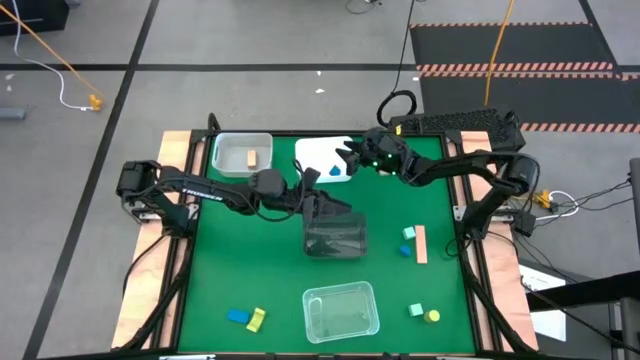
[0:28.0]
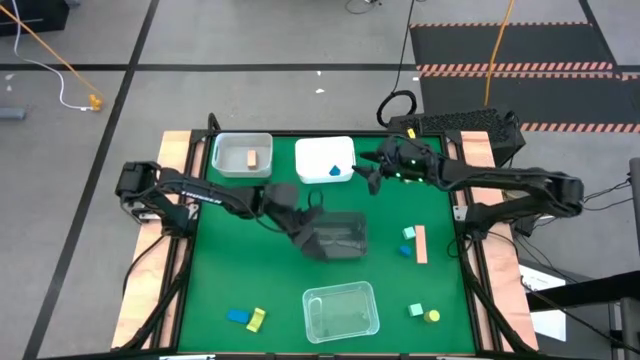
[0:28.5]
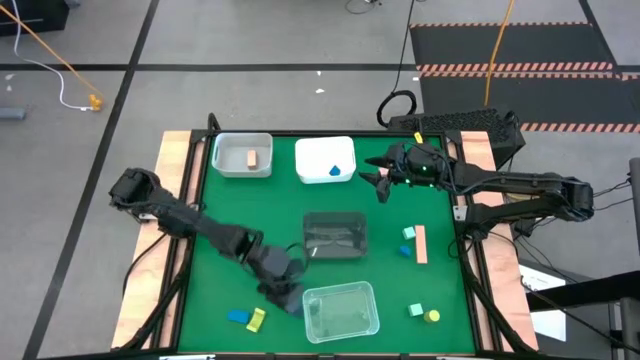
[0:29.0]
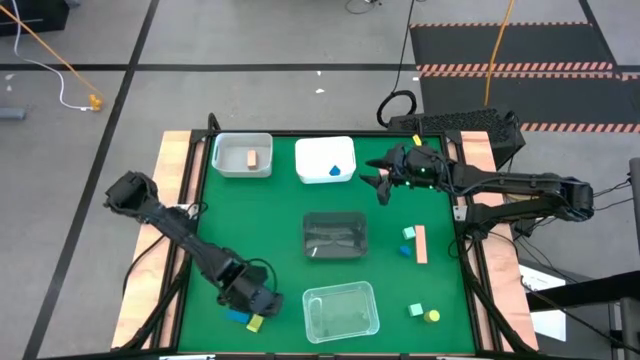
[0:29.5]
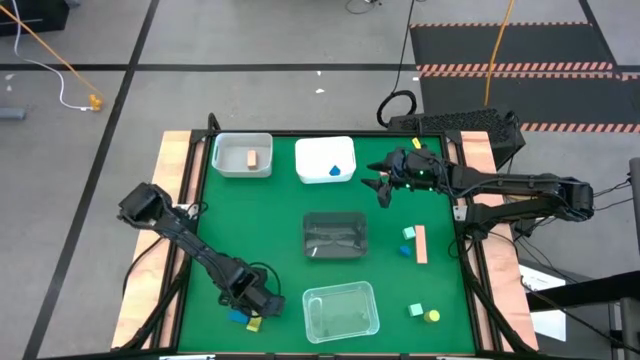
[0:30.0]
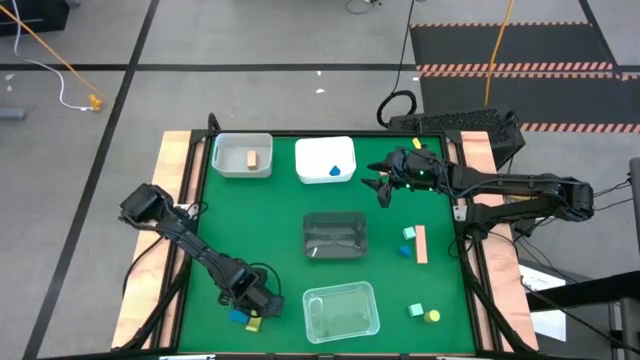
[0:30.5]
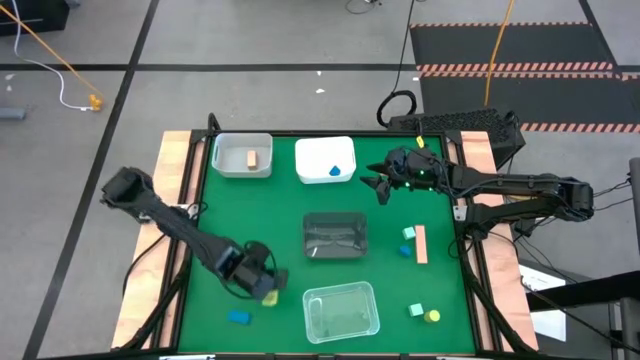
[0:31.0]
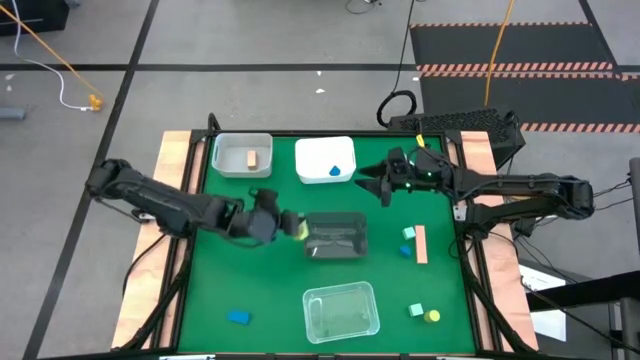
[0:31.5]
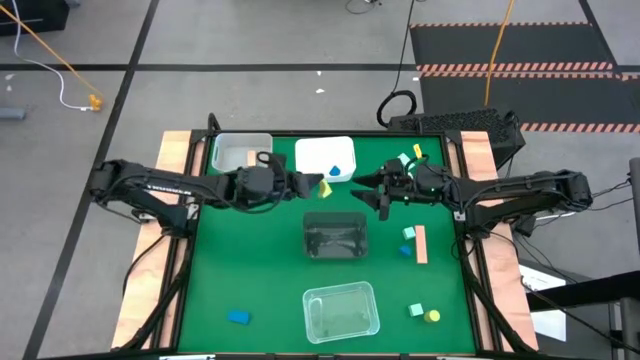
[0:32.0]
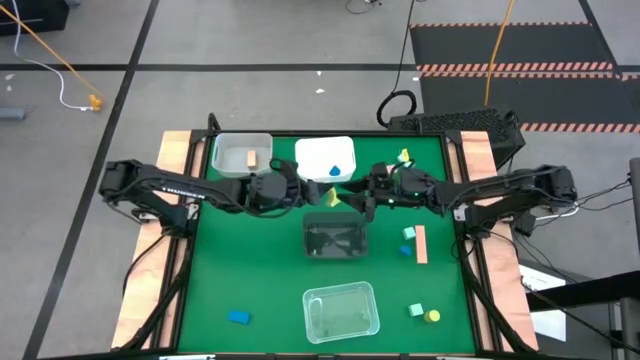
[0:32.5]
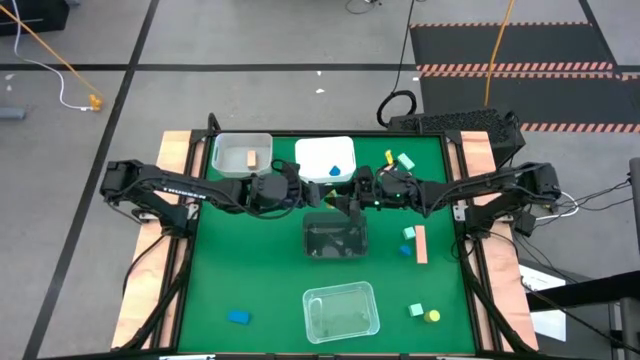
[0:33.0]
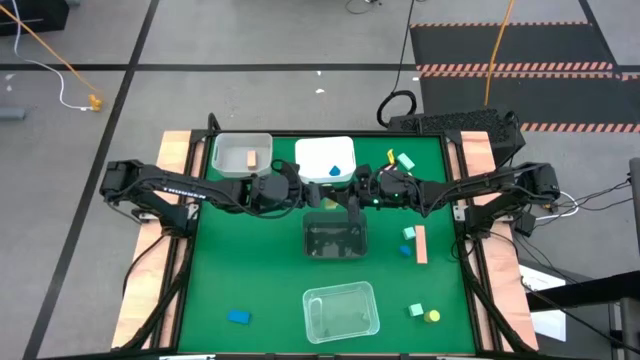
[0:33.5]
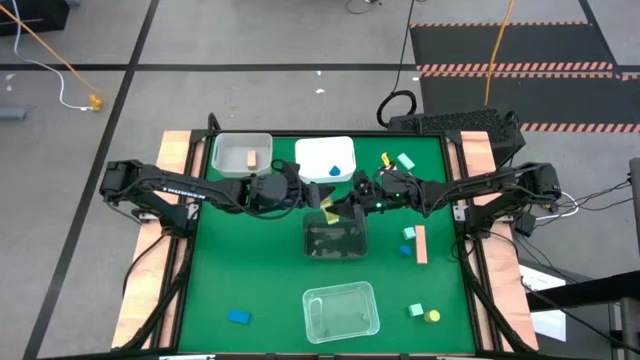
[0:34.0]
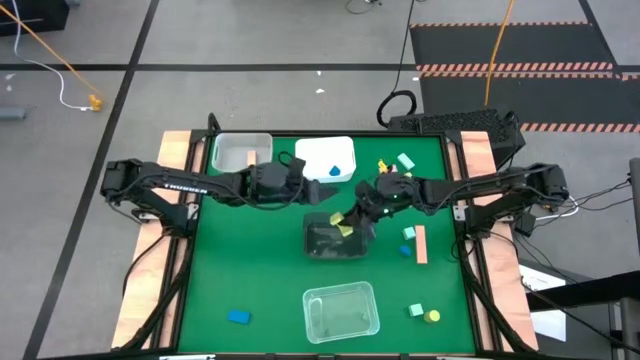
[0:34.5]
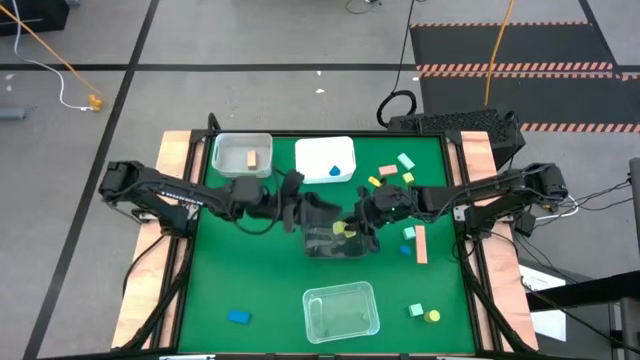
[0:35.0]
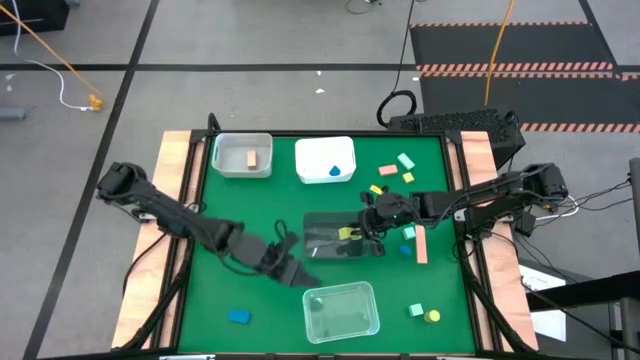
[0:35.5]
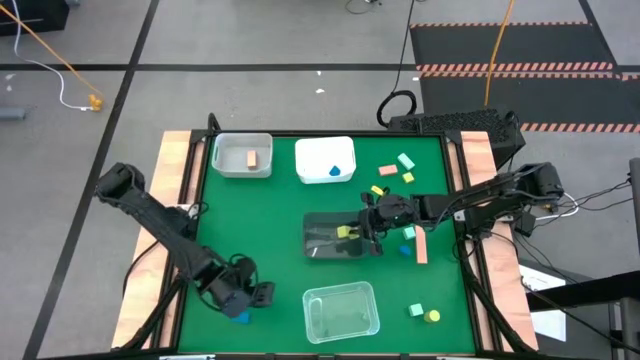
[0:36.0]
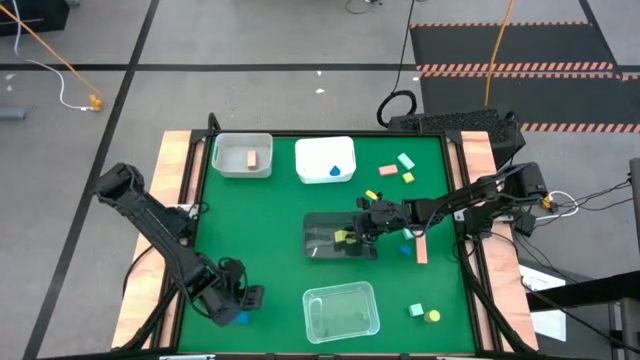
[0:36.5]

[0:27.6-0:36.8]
Task: Sort & place blocks by color
Put the left light green block into the black bin

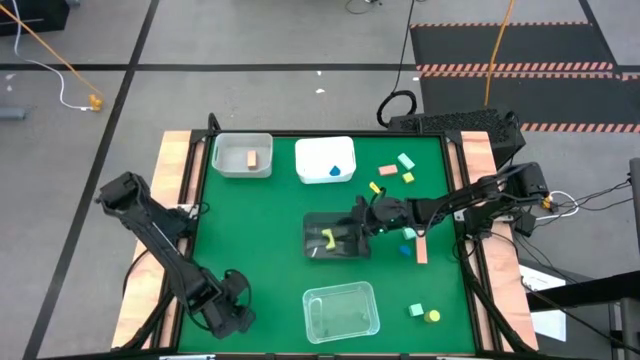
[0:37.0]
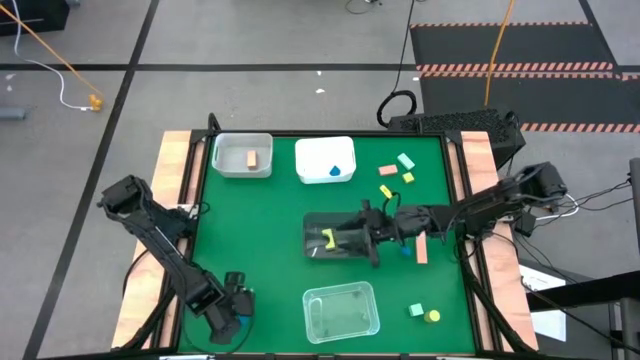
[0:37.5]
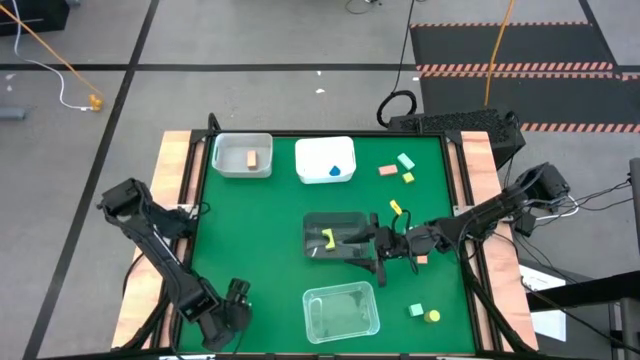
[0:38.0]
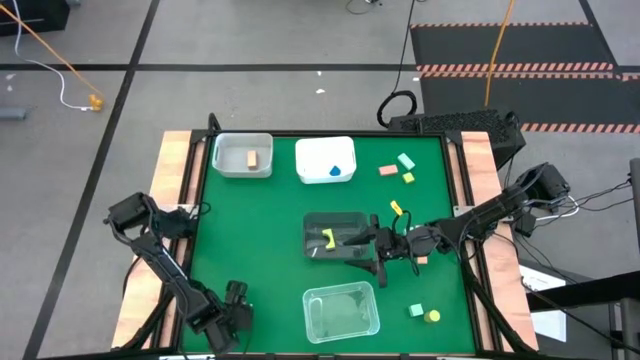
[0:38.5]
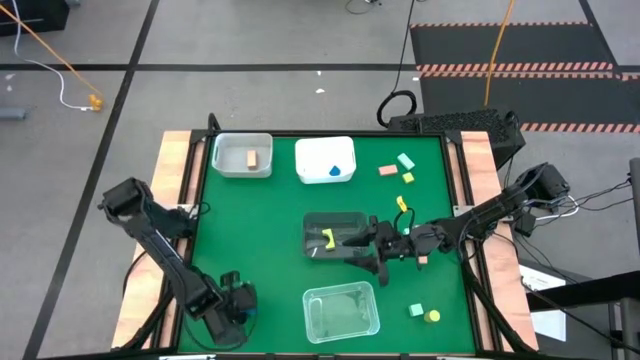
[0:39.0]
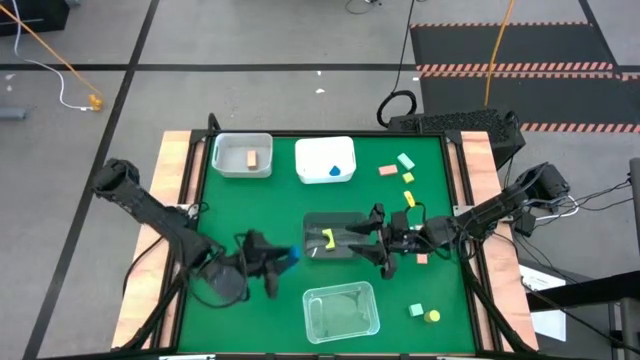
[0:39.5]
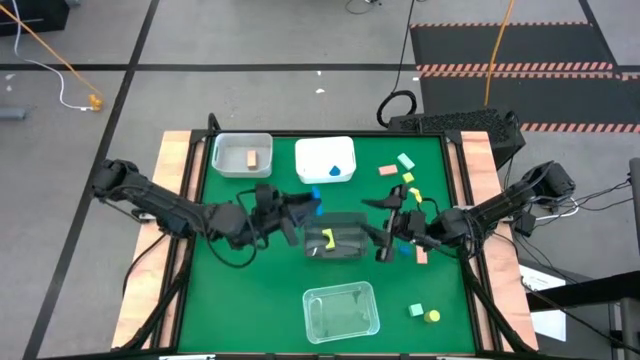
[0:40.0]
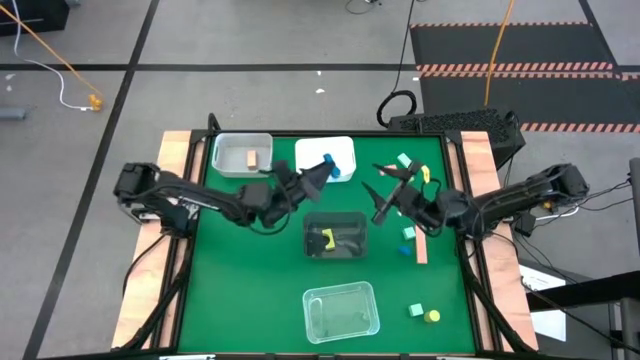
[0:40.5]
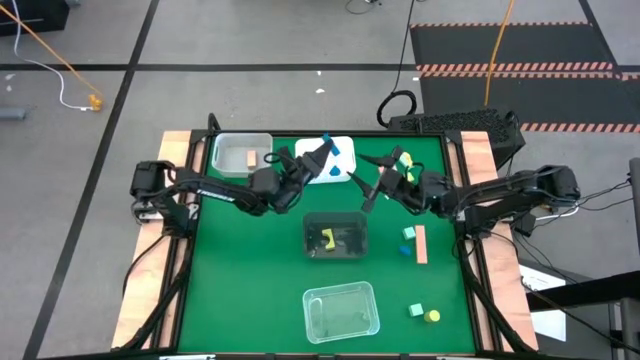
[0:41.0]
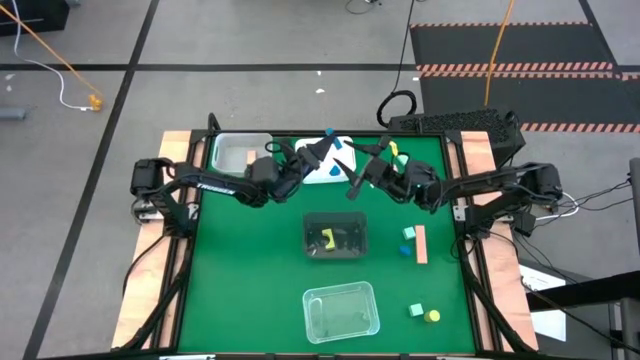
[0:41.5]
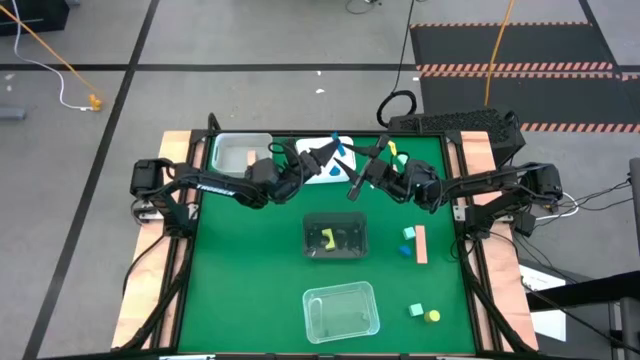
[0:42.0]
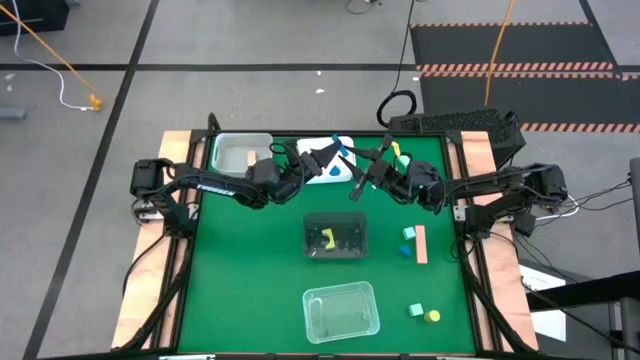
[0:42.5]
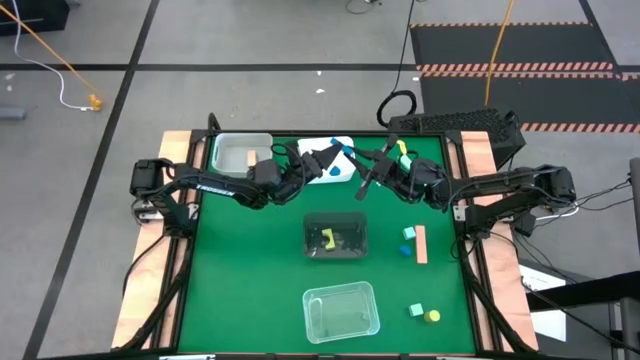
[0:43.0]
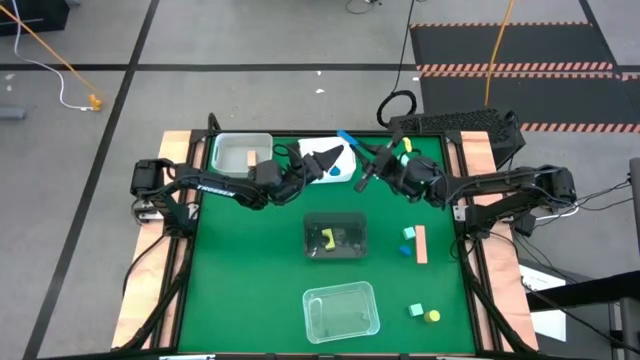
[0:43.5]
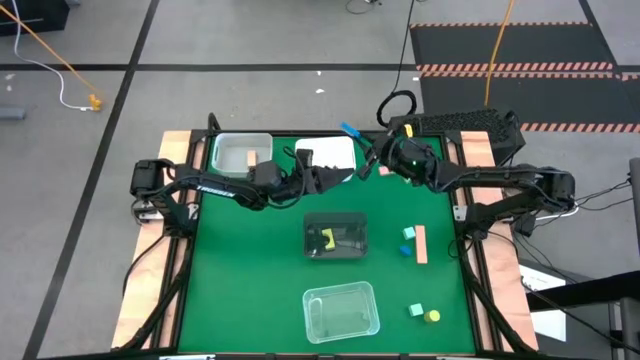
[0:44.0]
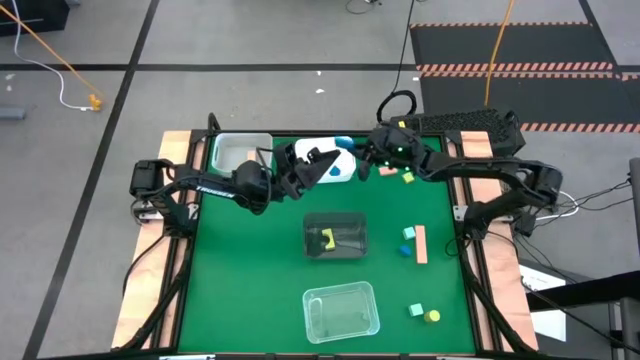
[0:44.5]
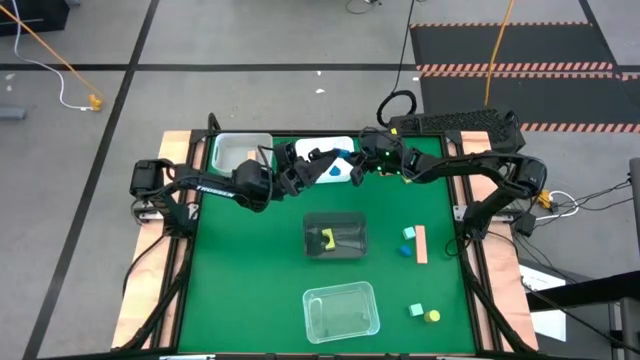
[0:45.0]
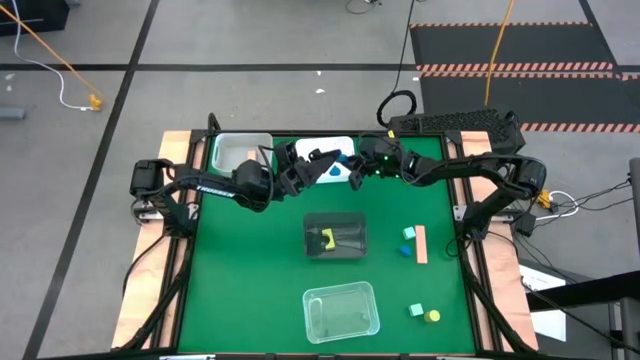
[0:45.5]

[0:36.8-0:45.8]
Put the left blue block into the white bin

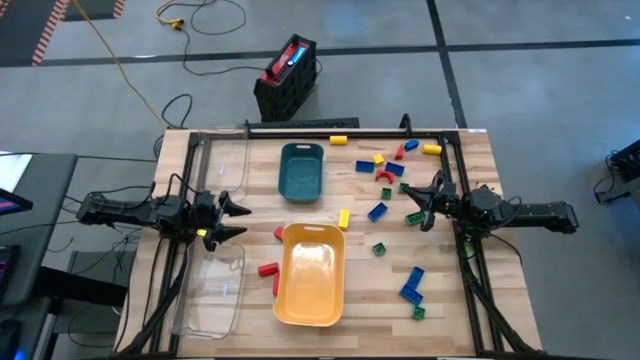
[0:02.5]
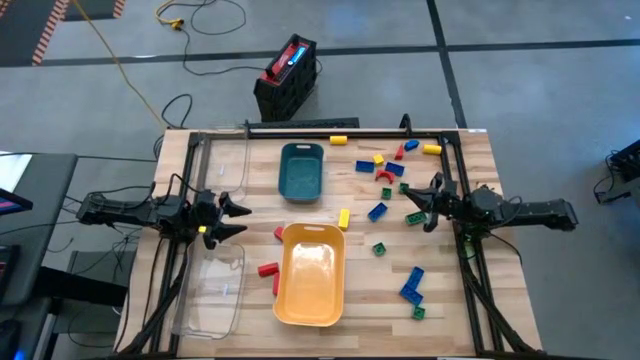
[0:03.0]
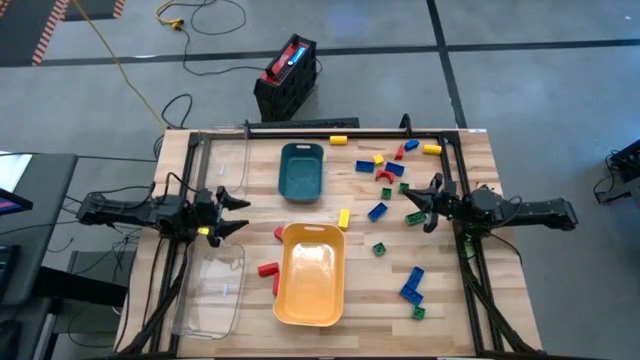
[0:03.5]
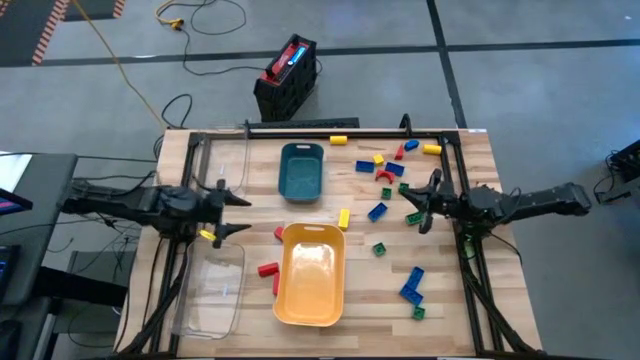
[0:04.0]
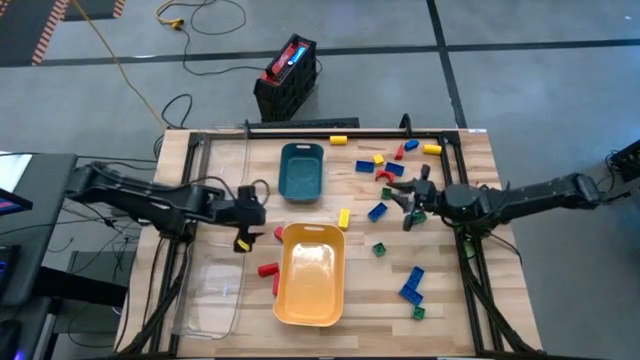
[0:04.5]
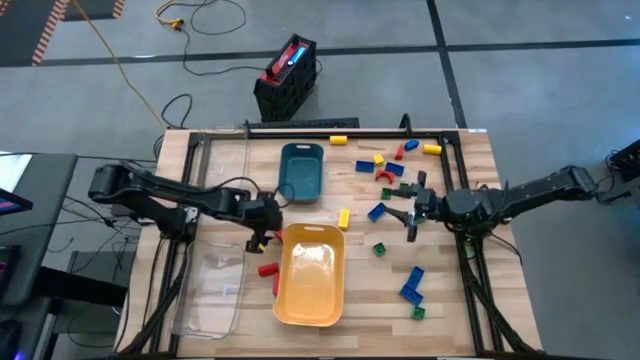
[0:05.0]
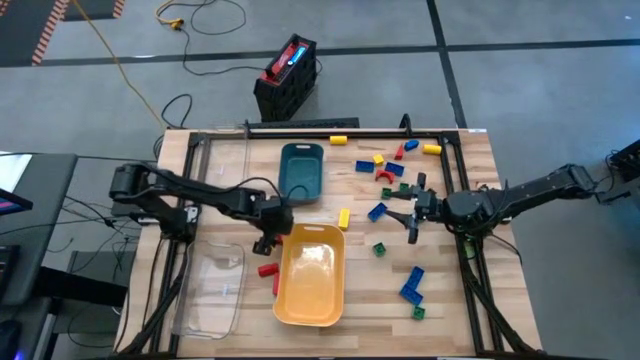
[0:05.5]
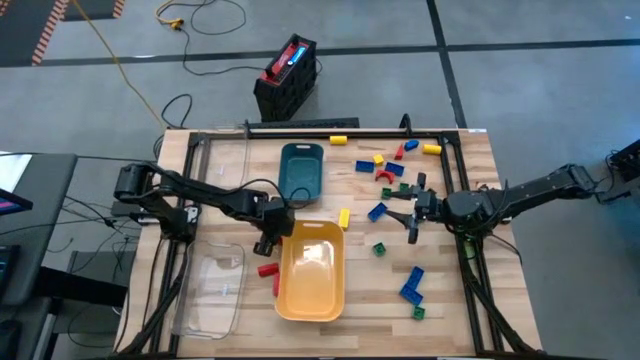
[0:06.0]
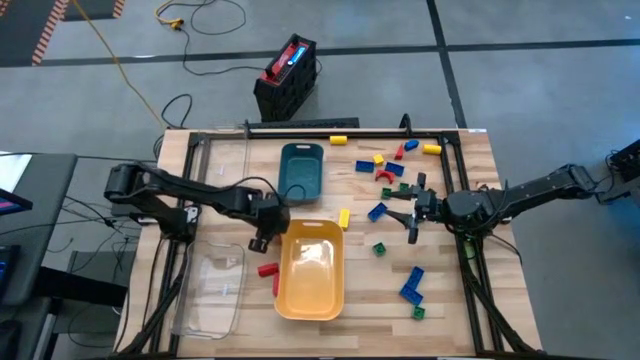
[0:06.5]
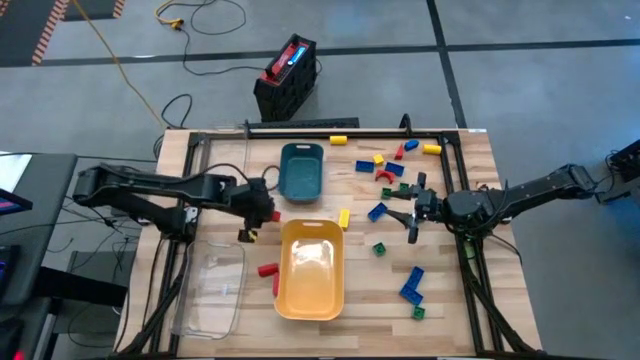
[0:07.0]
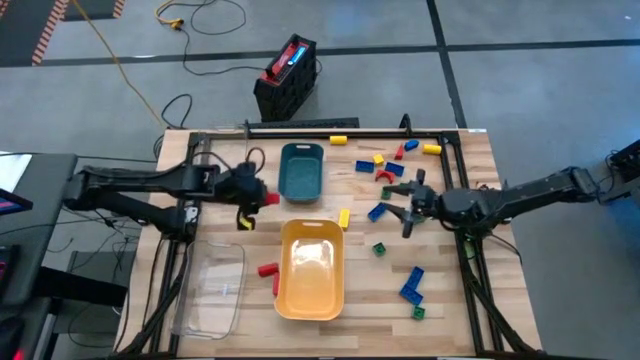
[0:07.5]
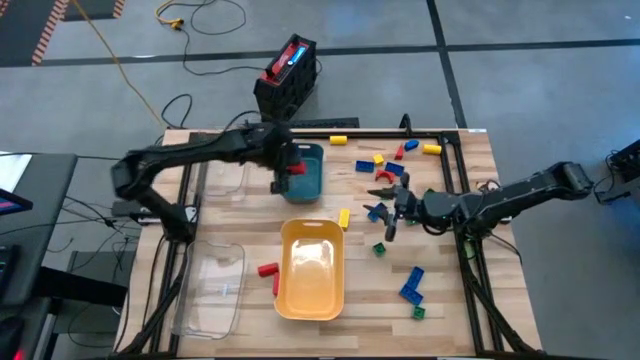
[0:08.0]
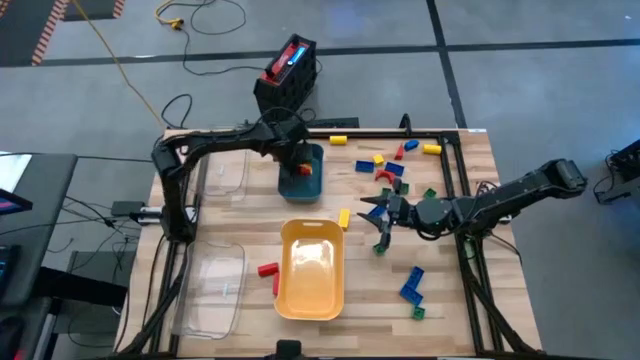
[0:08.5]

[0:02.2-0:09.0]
Task: Sort blocks
Put the red rectangular wooden block into the blue bin
